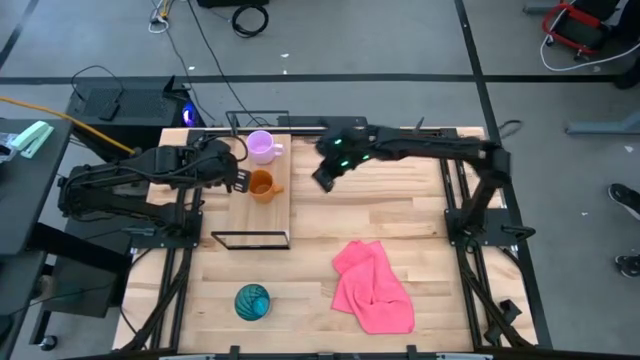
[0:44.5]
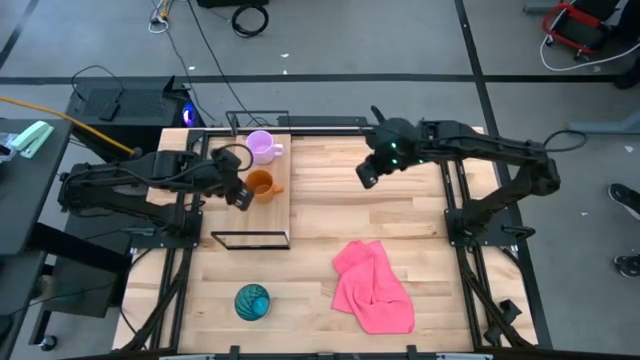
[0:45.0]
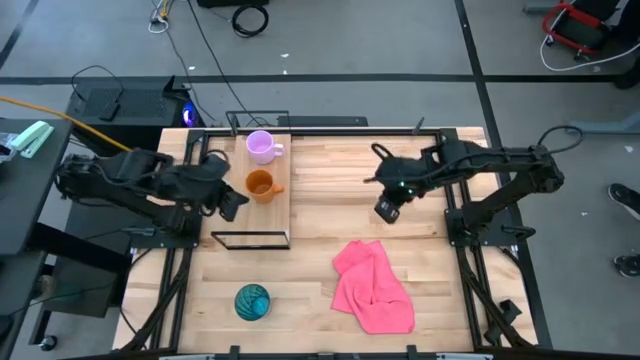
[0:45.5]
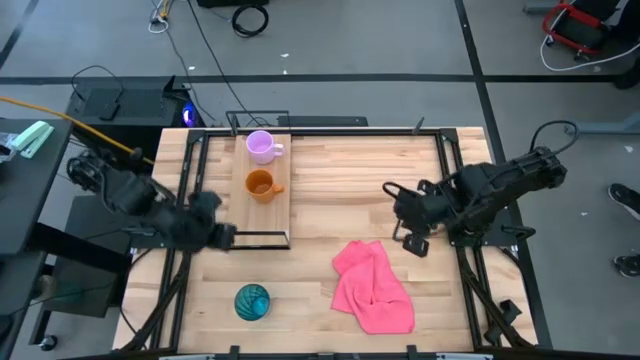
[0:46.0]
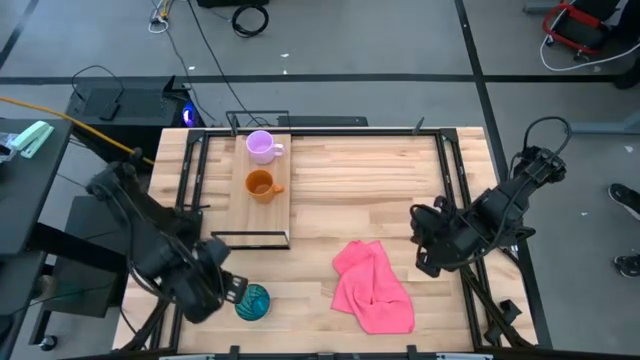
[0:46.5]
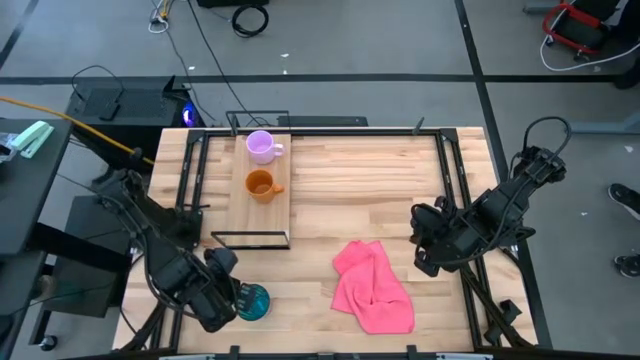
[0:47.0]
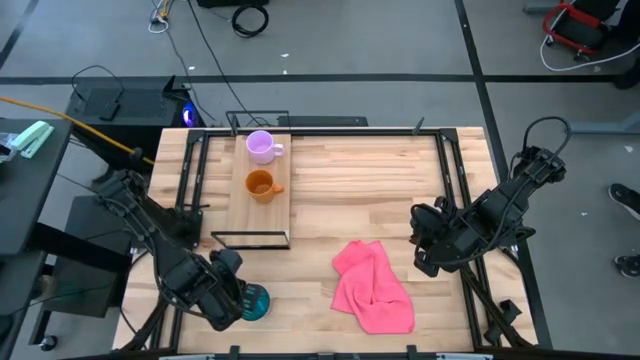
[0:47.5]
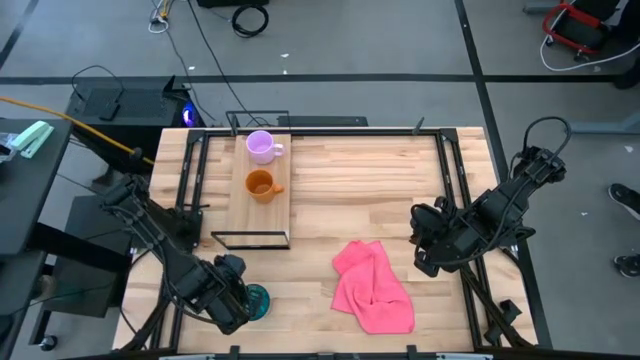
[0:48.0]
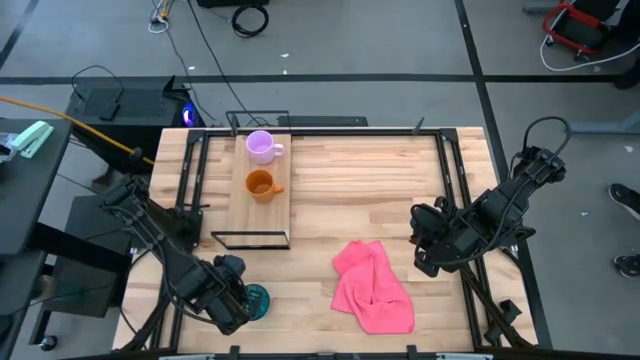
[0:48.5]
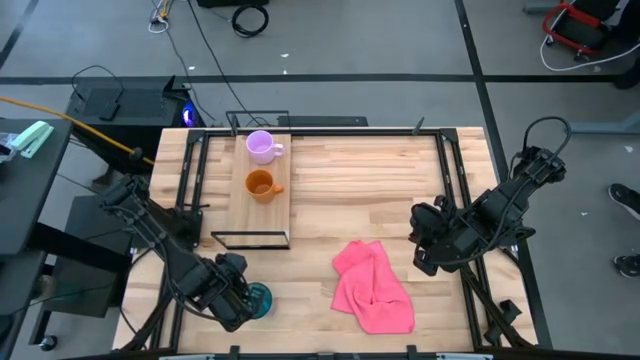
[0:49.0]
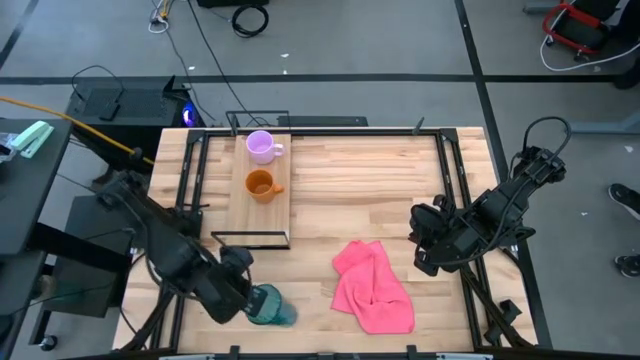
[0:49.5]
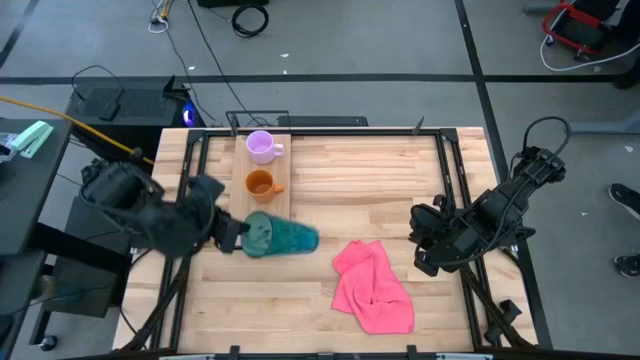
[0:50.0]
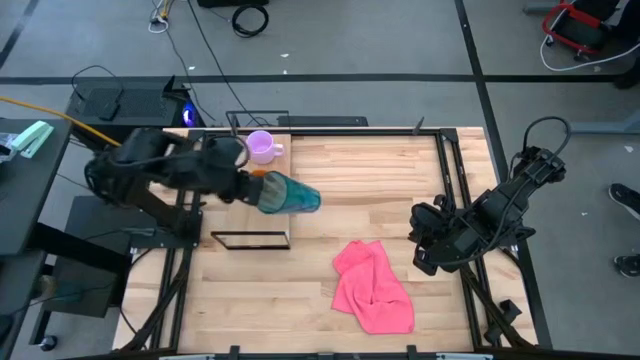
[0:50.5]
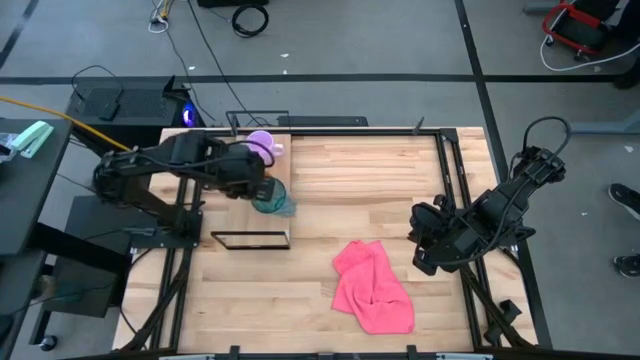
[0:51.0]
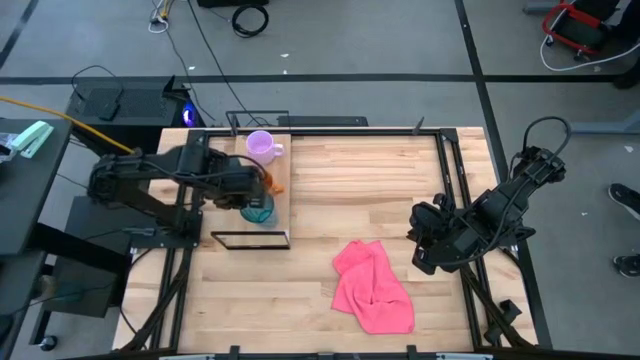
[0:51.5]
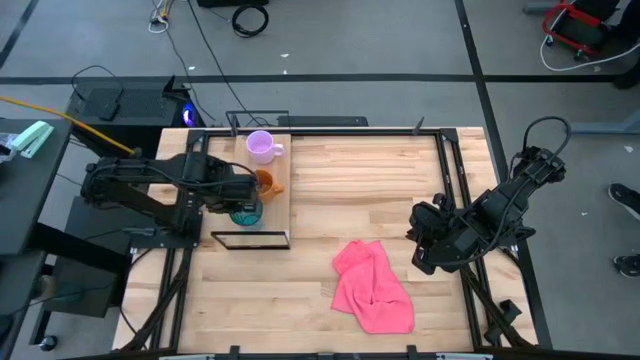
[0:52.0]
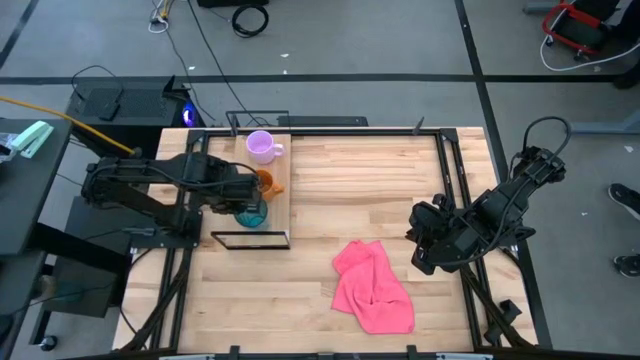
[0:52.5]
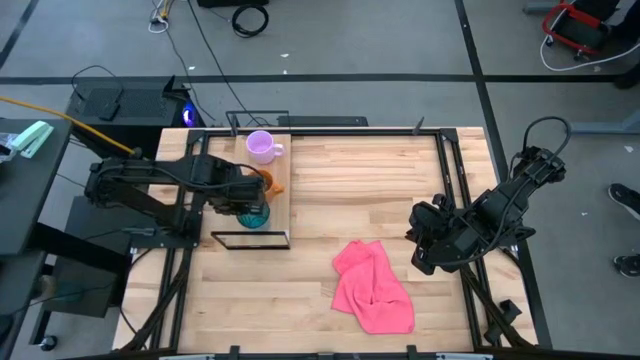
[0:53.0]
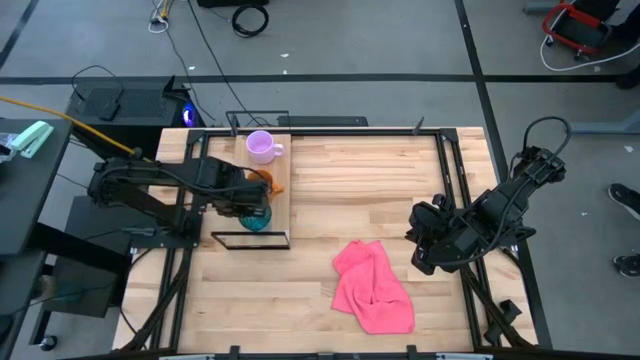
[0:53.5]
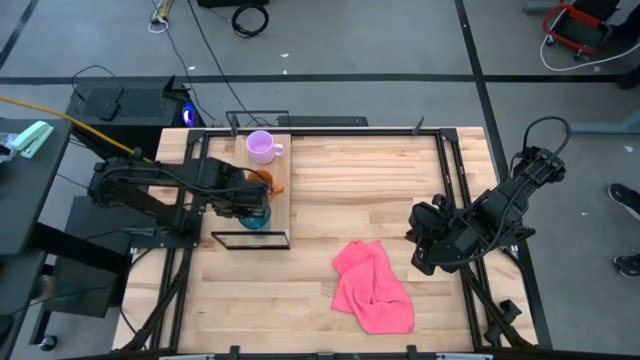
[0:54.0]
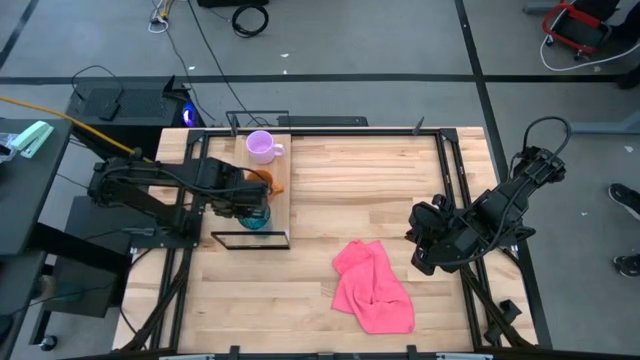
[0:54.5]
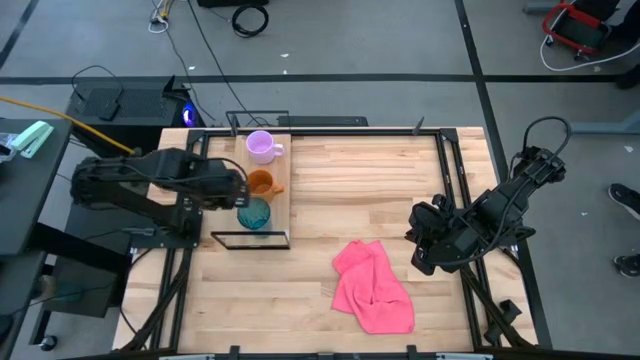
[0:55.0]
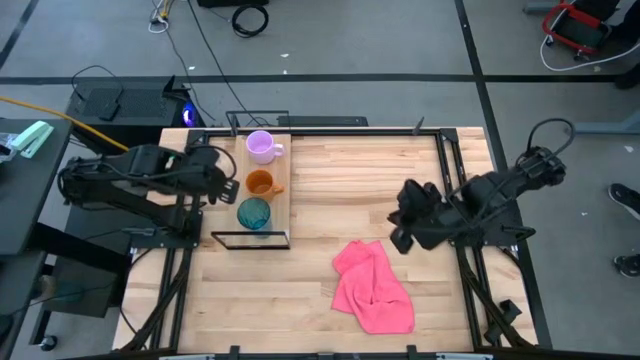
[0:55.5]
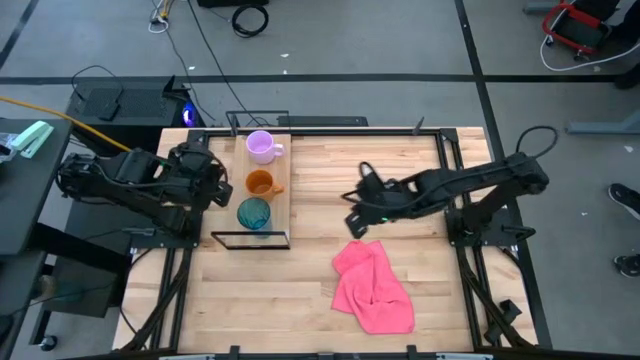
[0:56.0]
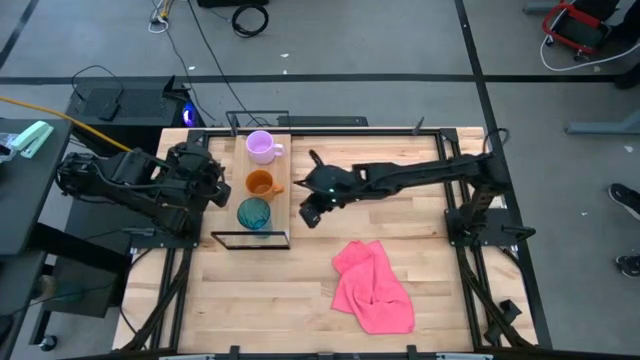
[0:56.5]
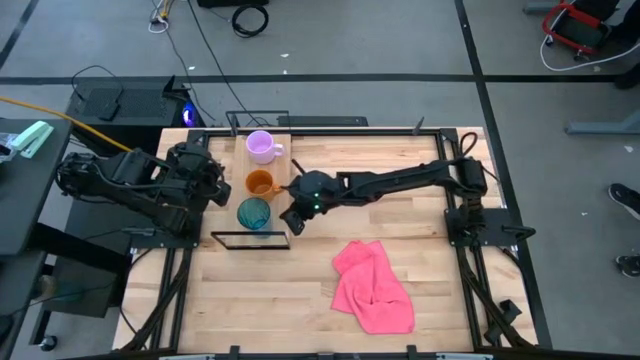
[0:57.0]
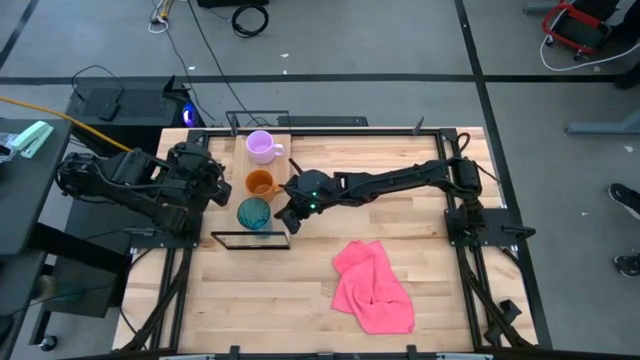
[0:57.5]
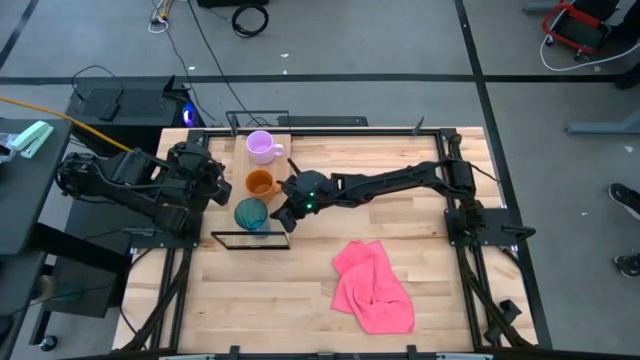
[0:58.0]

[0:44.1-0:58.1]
Task: Stack small to large cups/mugs on shelf
Put the blue cup on the shelf

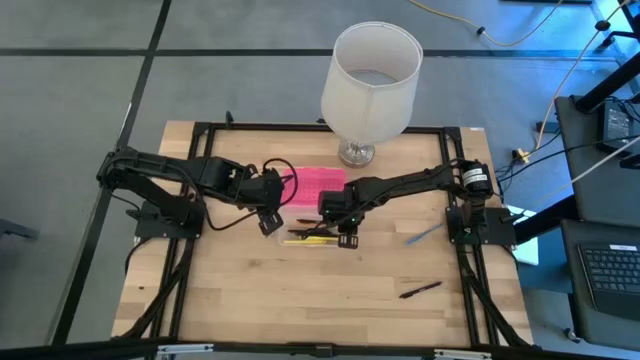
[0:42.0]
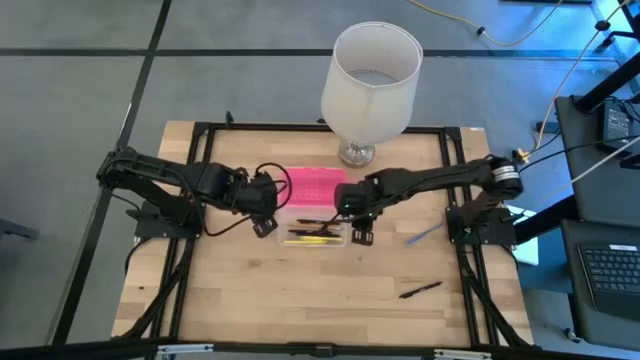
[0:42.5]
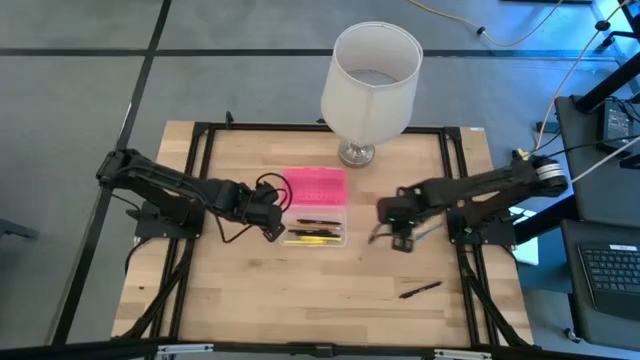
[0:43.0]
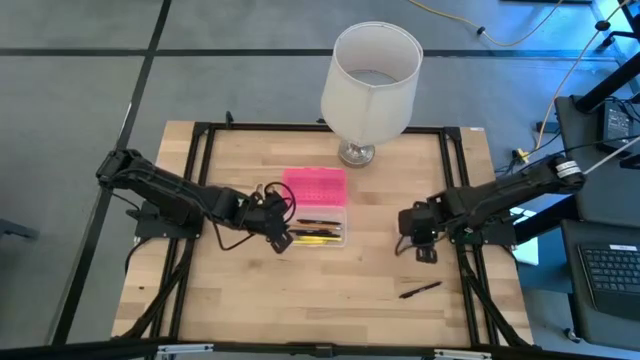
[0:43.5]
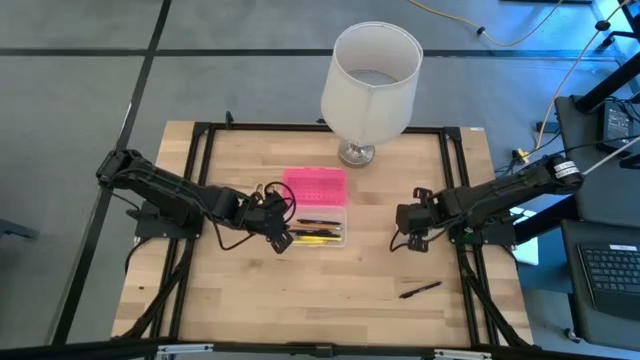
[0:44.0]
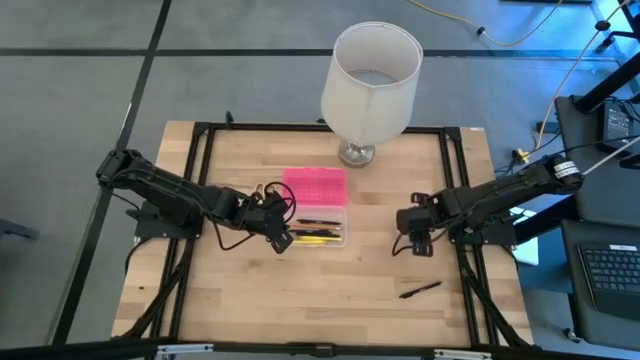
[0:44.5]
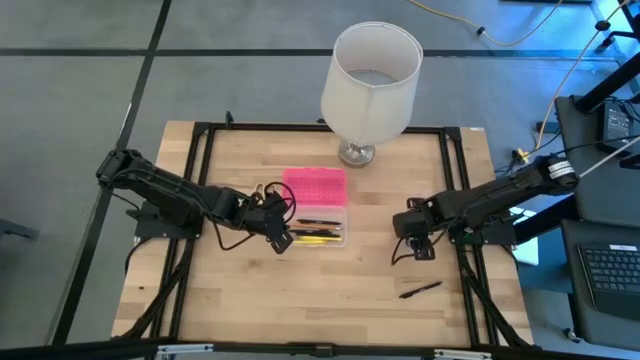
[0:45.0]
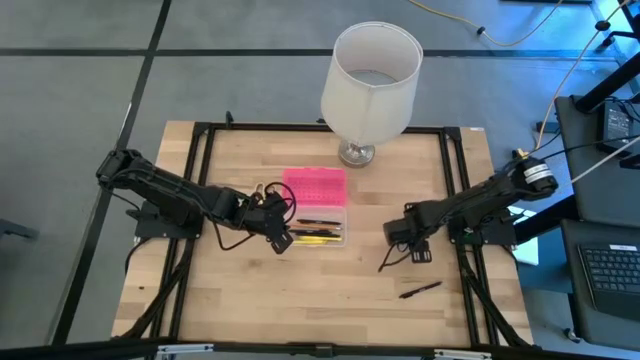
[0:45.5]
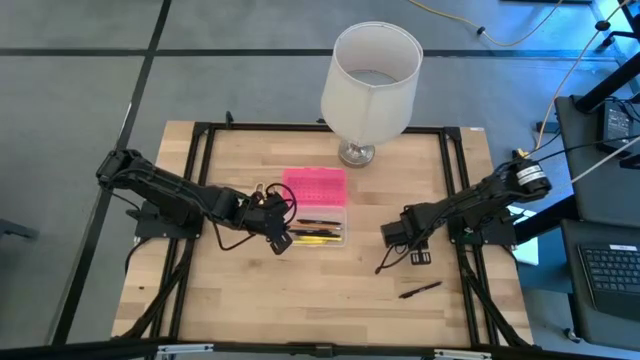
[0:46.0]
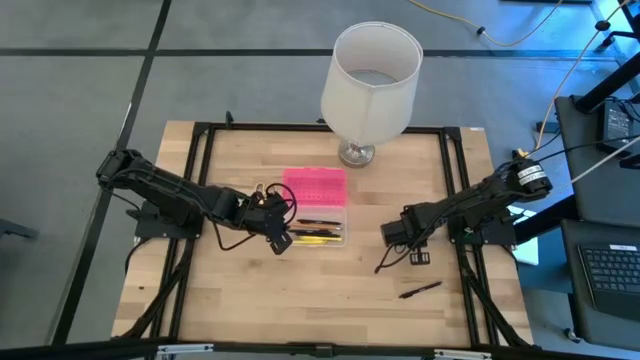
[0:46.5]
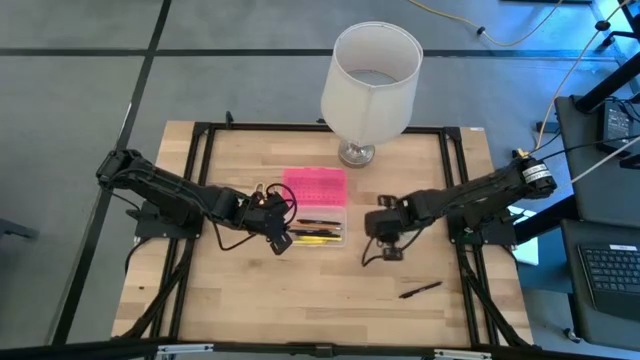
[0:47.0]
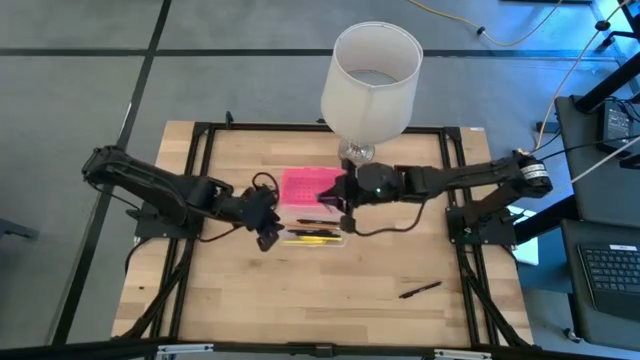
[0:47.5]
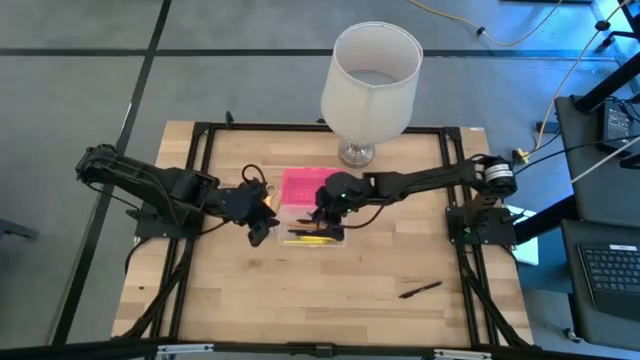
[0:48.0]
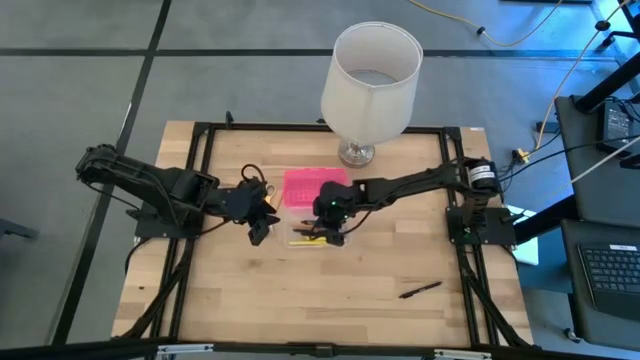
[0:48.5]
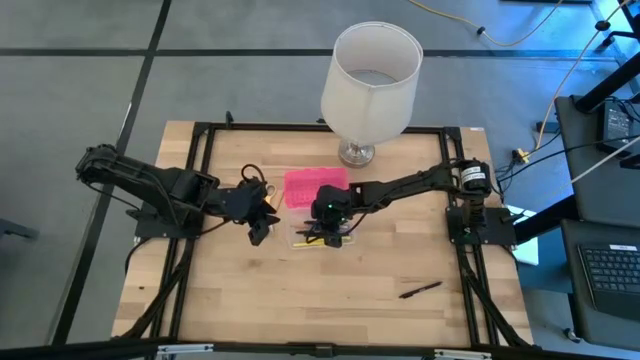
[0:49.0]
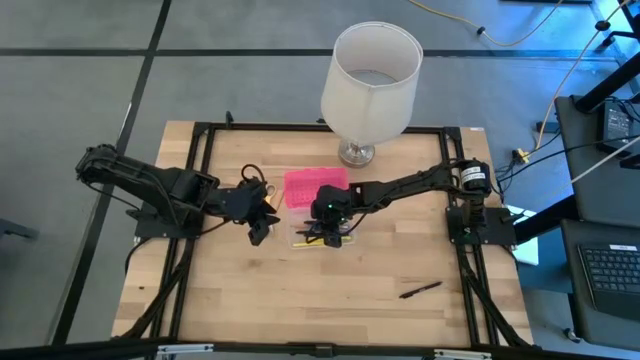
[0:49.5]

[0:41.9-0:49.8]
Task: Pick & place school supplies into a supply box
Put the blue pen into the supply box

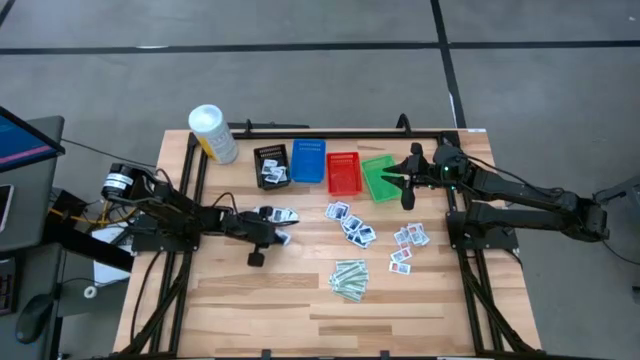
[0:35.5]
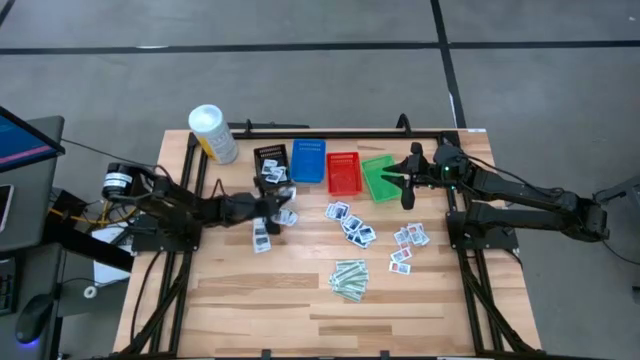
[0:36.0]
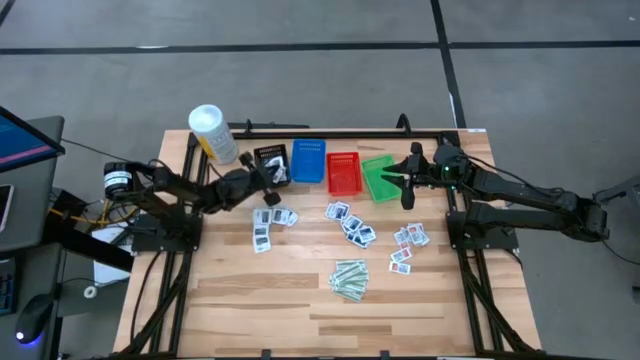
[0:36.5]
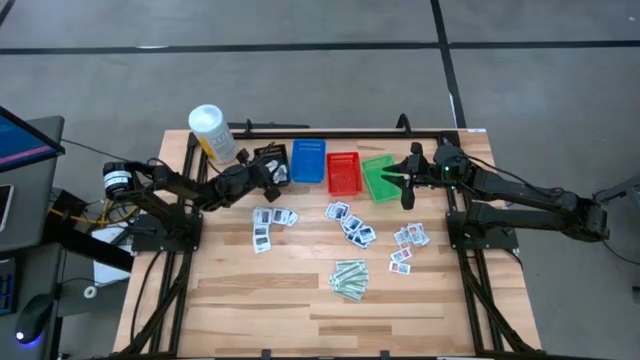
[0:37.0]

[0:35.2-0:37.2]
Task: Pick & Place First Aid Supplies
Put the gray pad into the black bin
